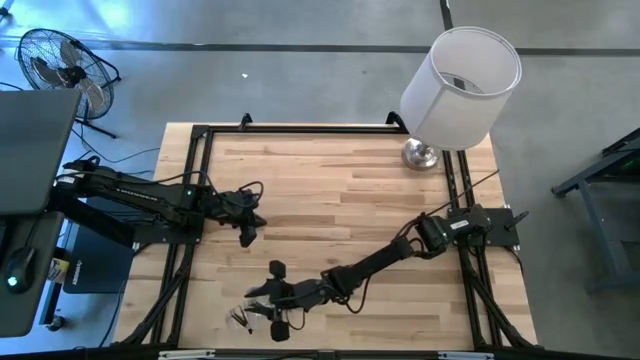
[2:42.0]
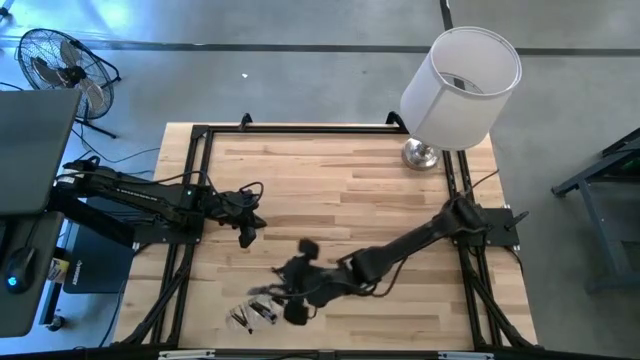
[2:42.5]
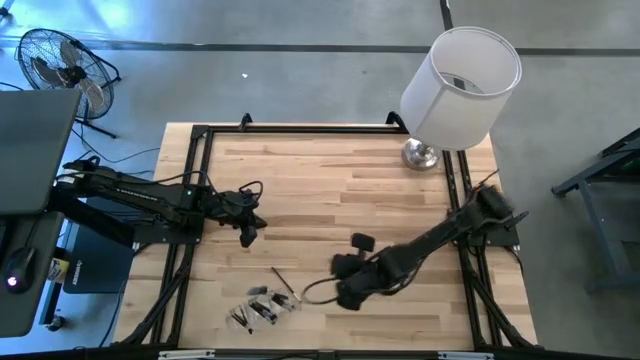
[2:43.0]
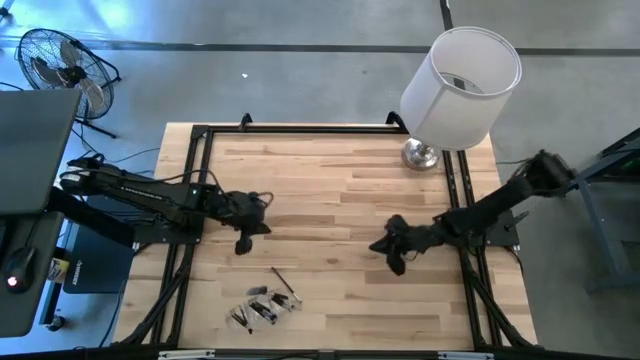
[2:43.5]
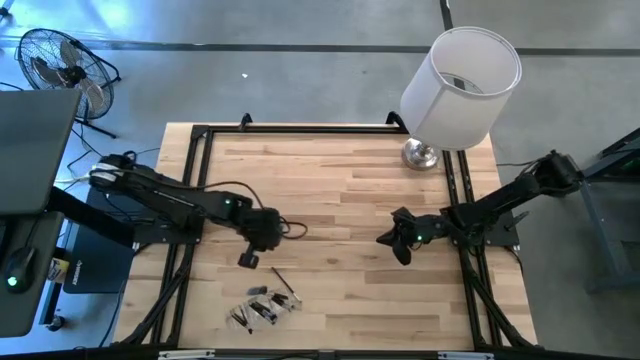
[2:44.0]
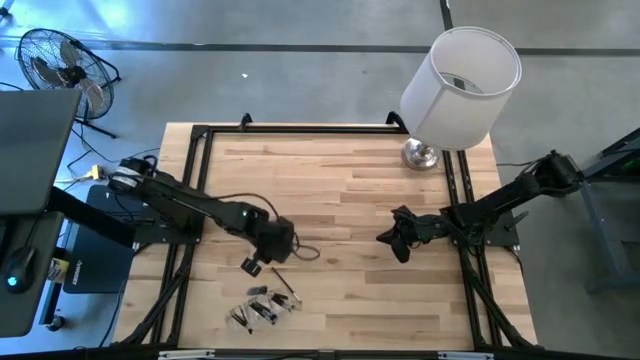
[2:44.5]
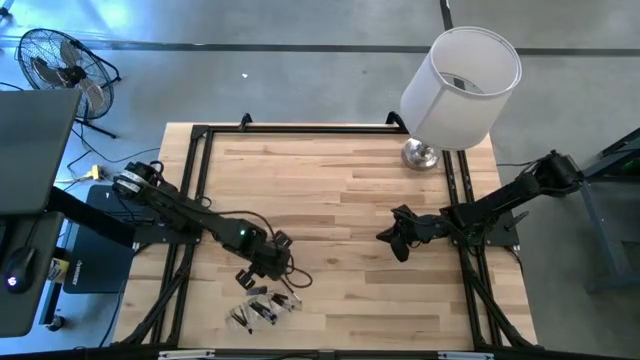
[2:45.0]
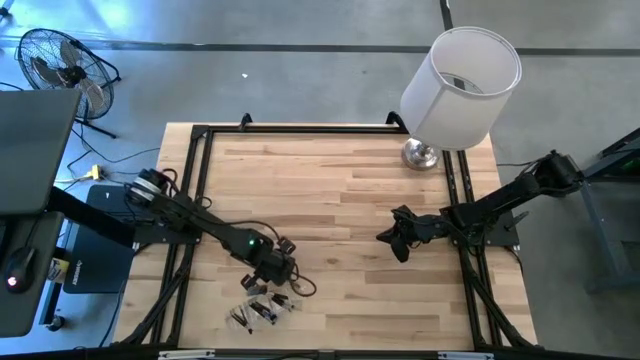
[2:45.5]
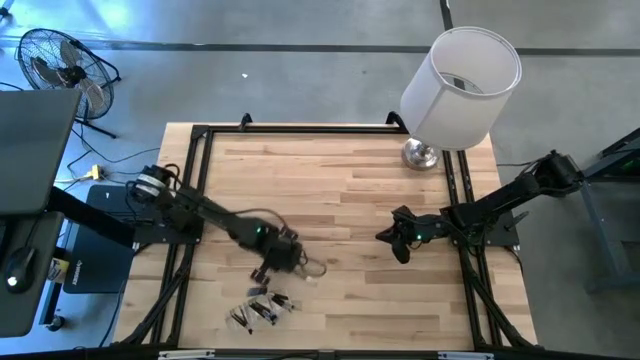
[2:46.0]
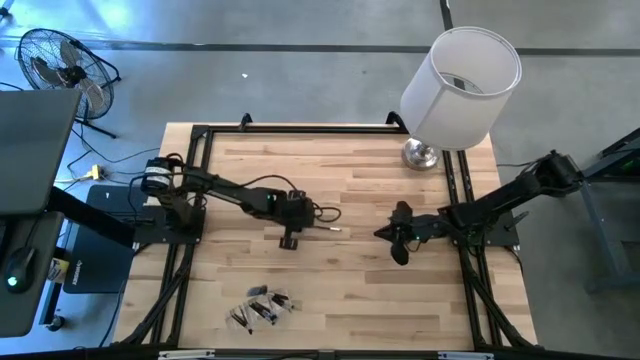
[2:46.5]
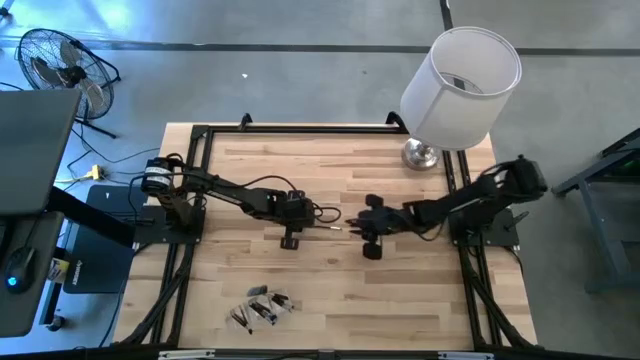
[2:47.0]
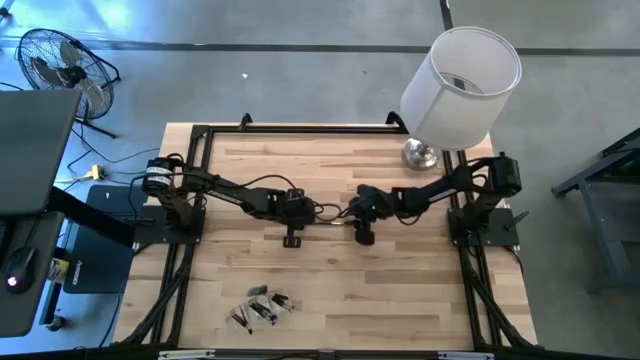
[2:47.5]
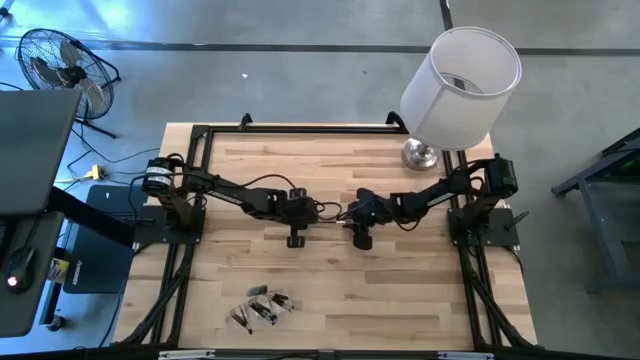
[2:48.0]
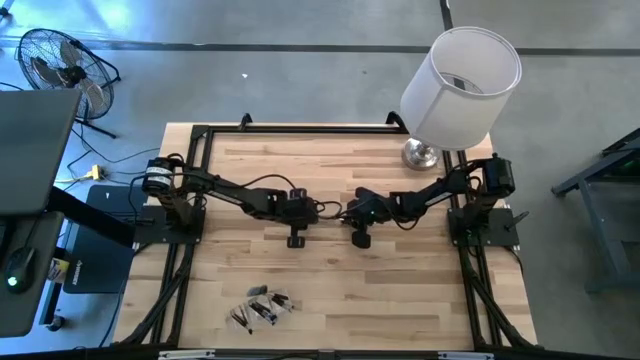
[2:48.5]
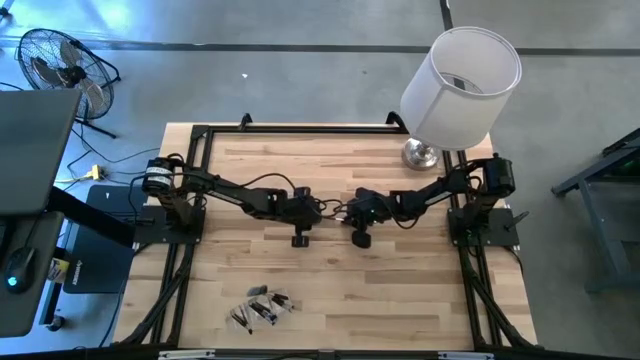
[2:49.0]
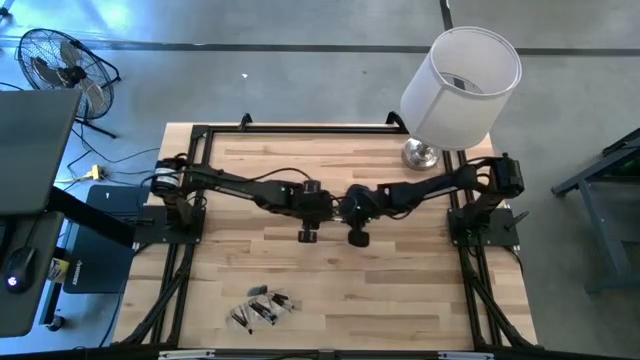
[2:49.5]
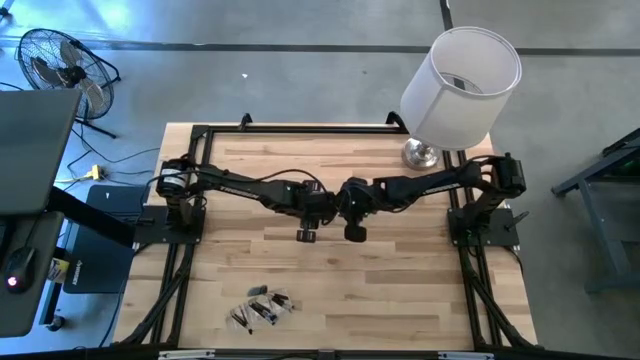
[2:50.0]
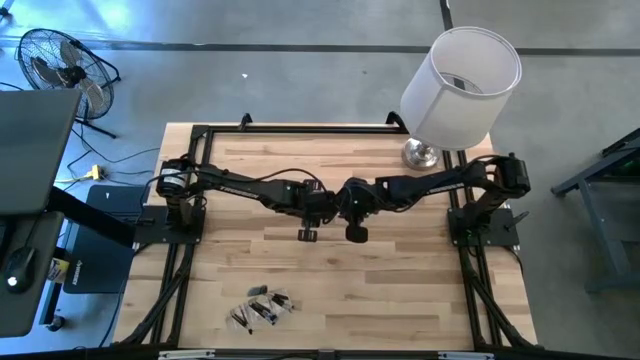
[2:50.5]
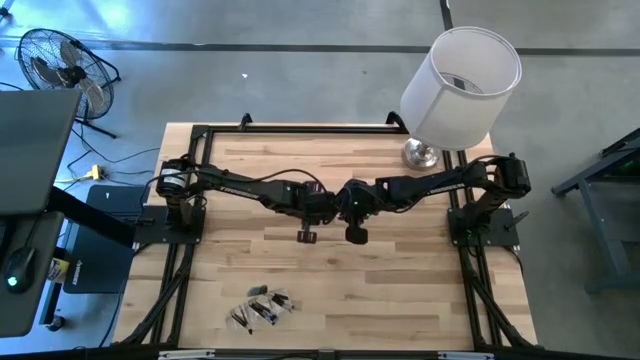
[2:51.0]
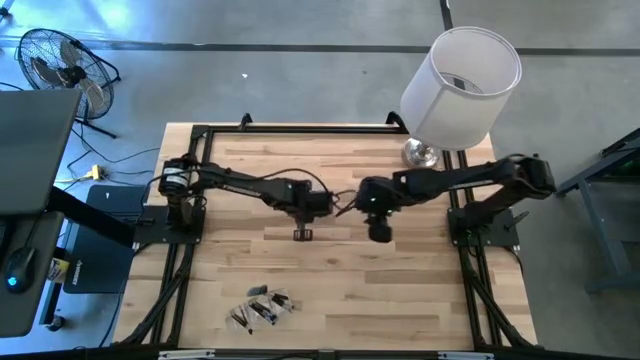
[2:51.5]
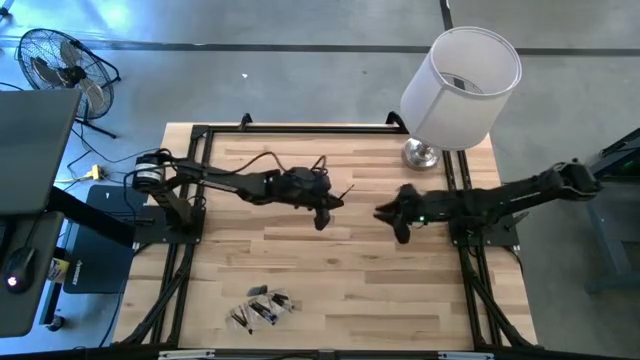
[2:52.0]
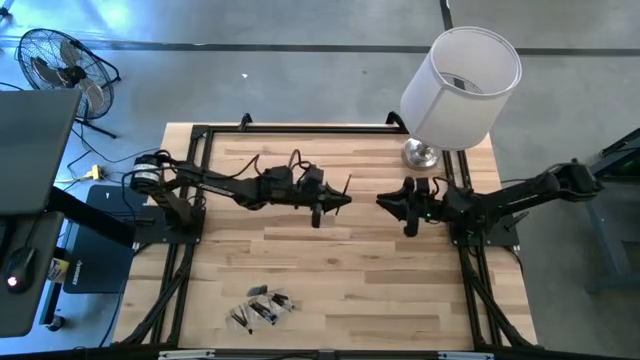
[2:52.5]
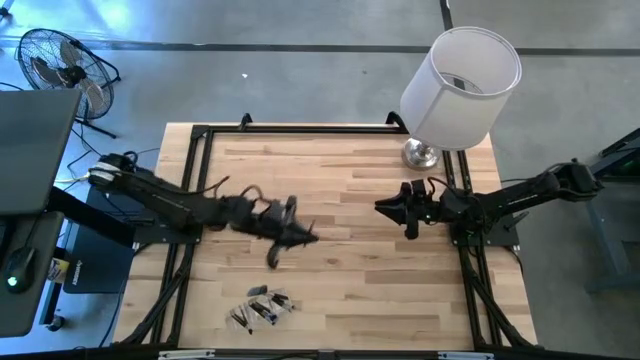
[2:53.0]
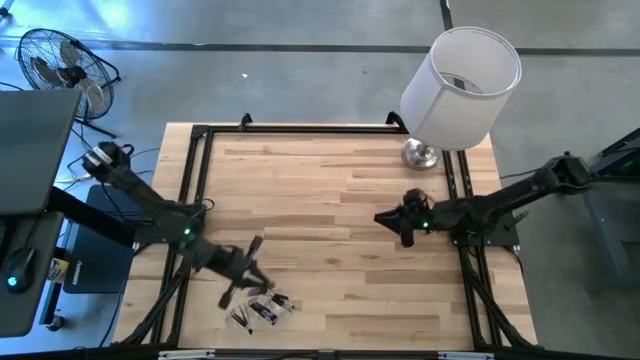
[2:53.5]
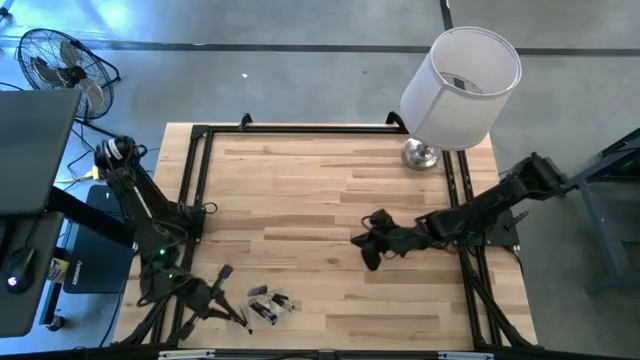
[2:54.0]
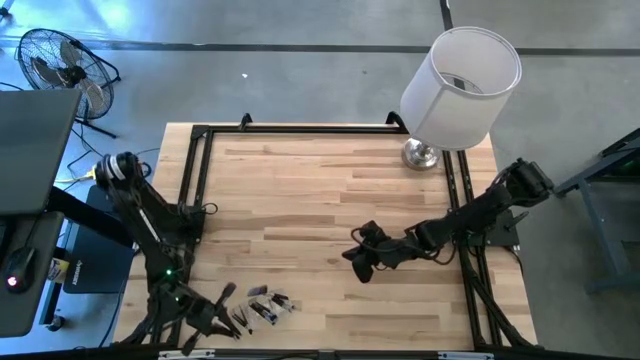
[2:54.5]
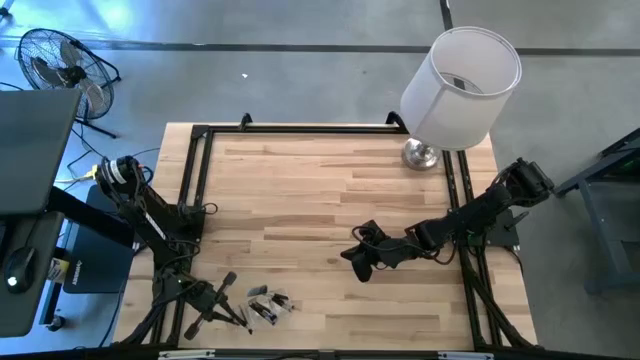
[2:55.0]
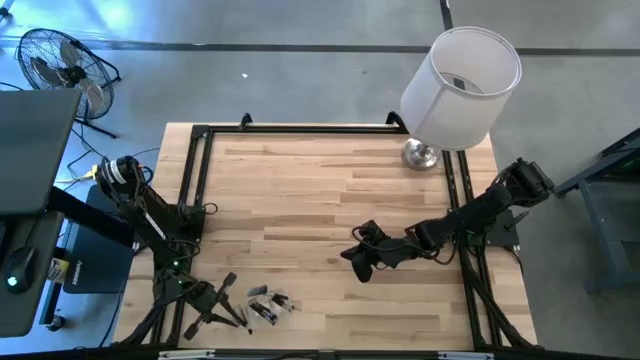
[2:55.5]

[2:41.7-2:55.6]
Task: Pick & Place Makeup Supplies
Put the silver makeup brush into the transparent organizer

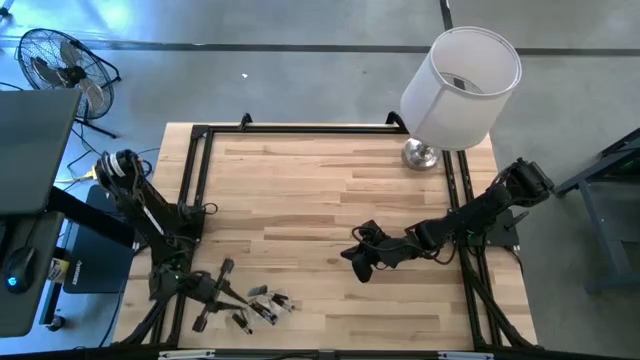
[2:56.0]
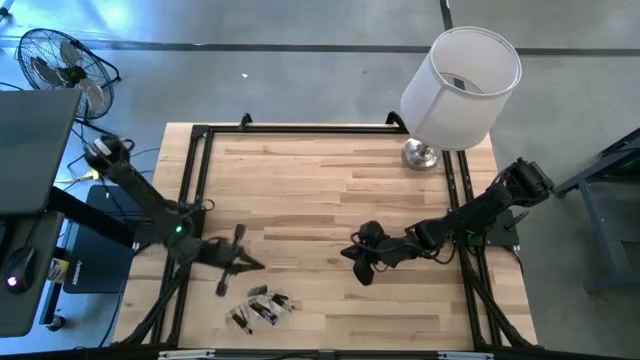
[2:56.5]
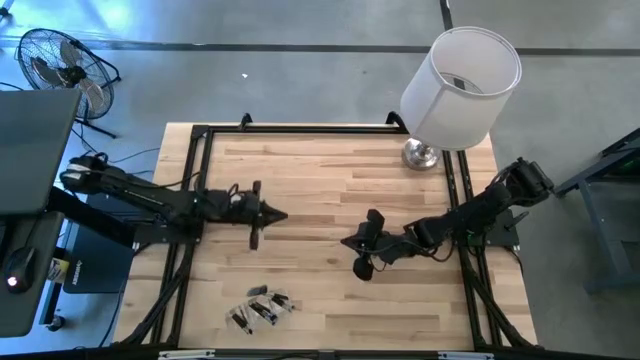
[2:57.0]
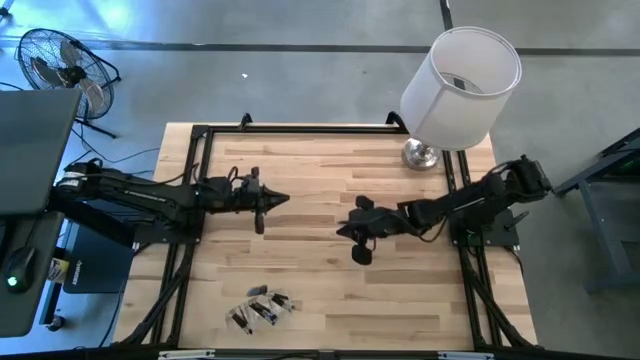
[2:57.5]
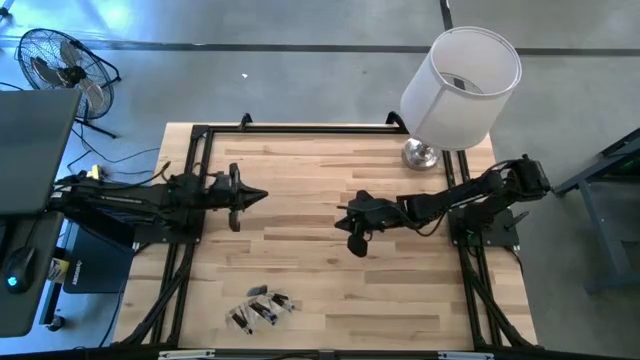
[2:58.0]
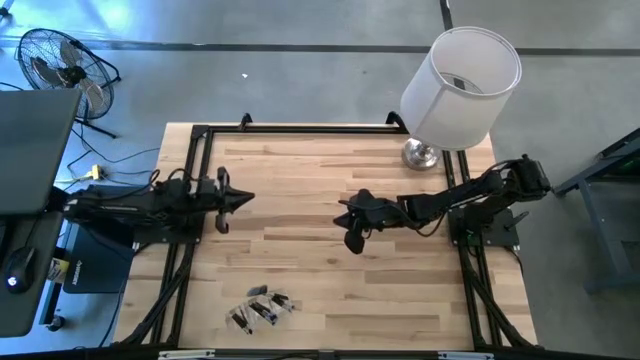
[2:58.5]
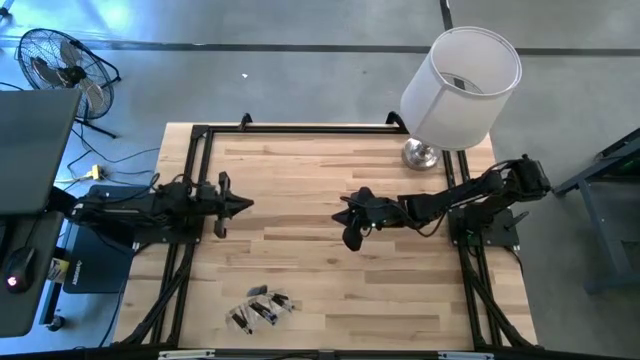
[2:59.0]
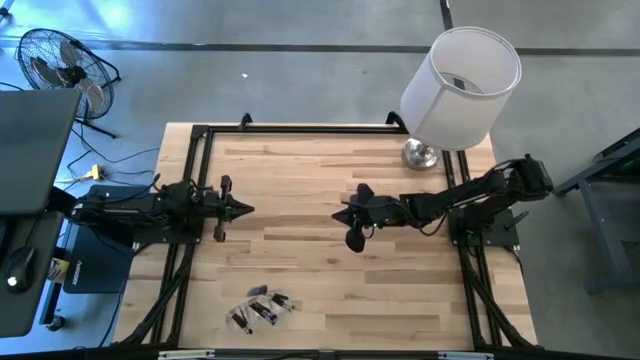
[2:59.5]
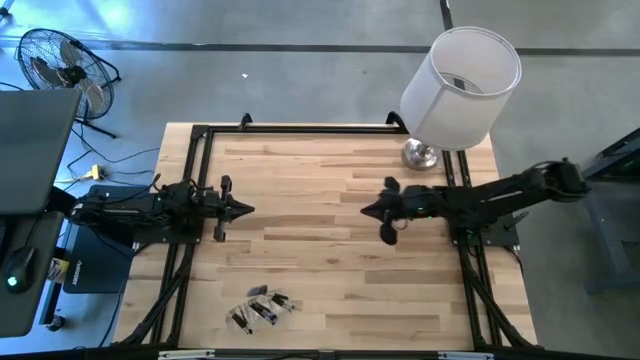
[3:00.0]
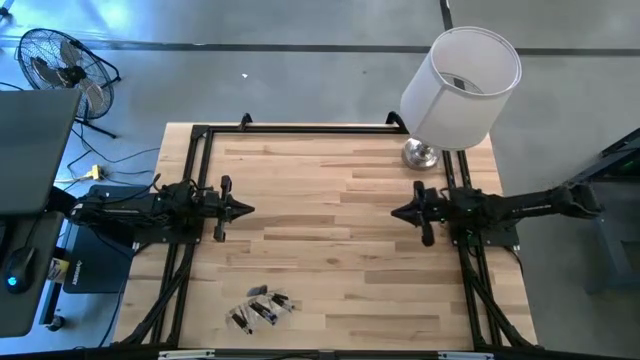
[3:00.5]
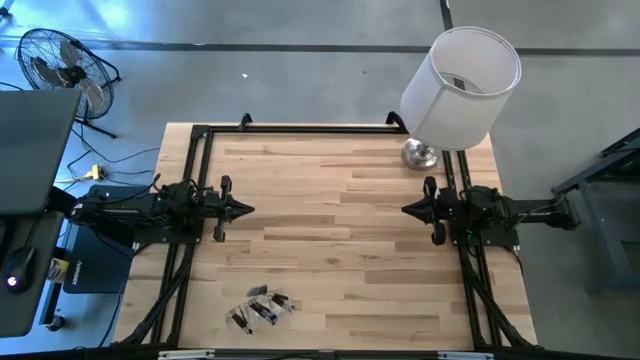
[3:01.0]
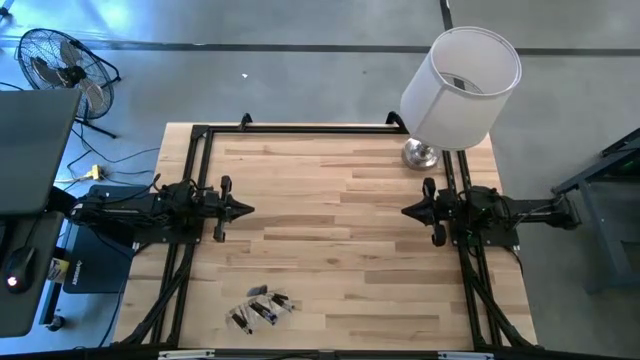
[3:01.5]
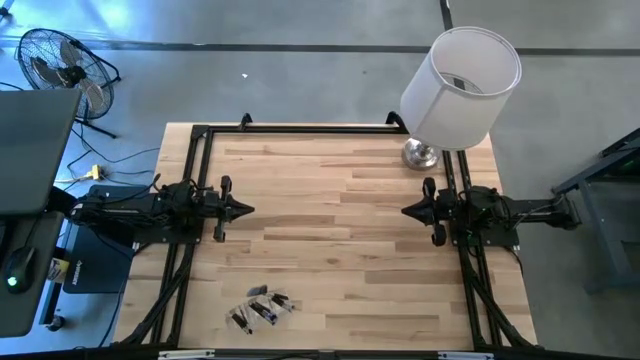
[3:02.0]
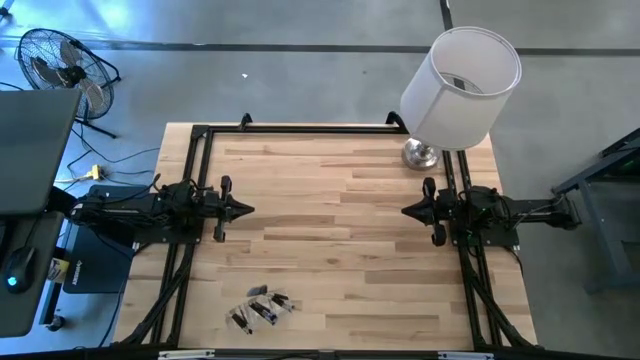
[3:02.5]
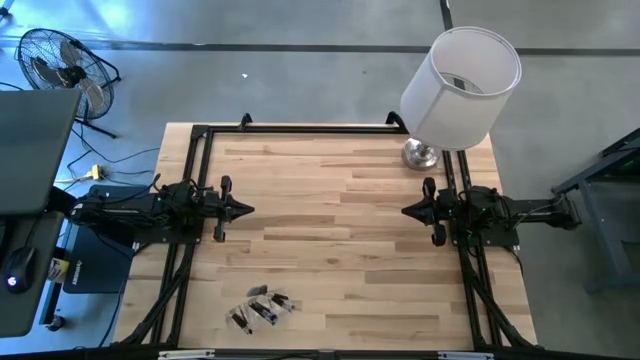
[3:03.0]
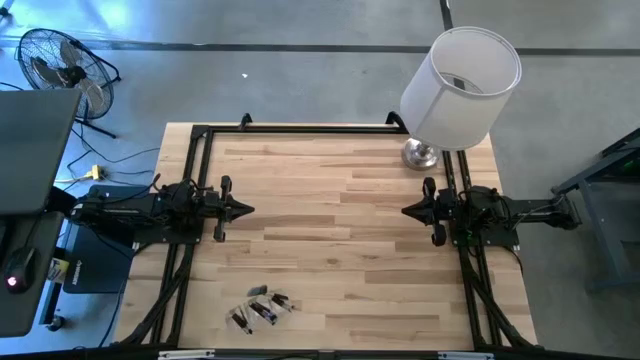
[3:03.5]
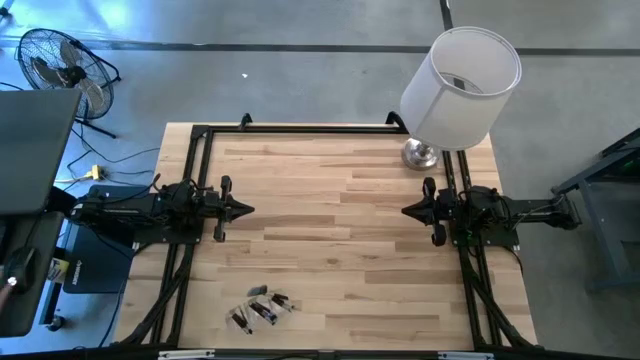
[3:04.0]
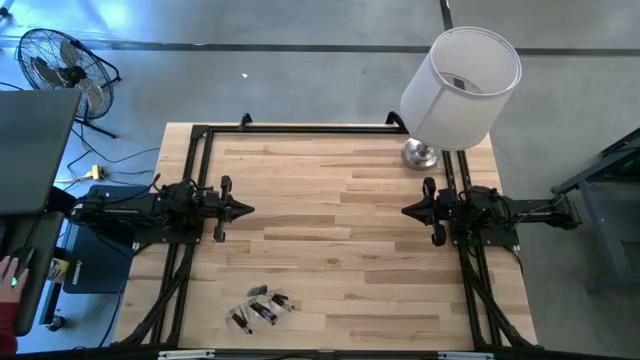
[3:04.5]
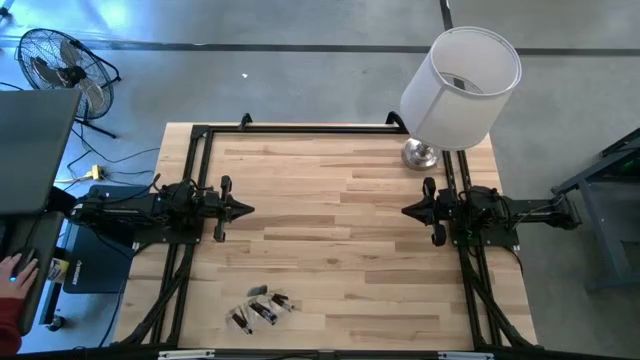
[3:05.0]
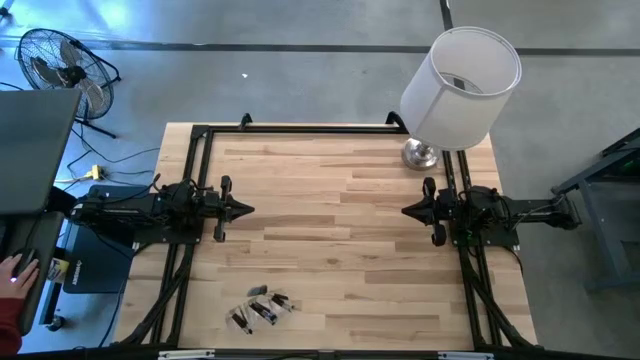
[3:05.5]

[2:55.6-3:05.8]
Return to Home Position
